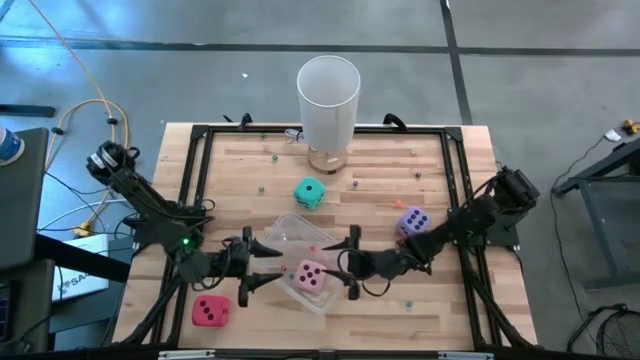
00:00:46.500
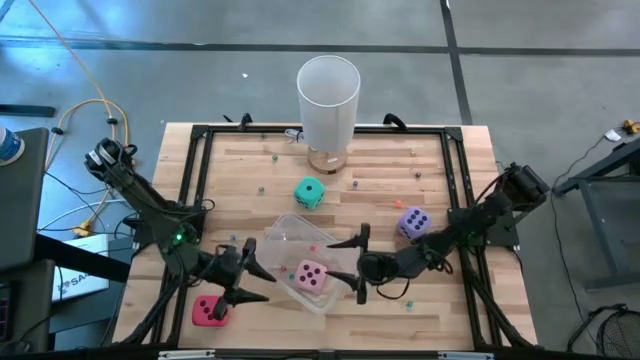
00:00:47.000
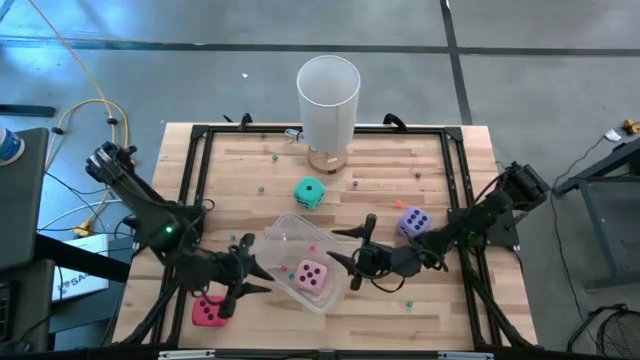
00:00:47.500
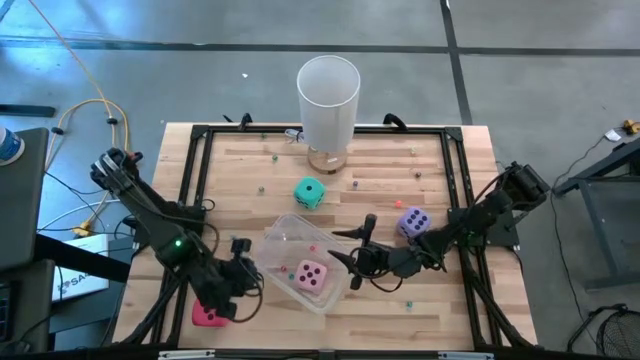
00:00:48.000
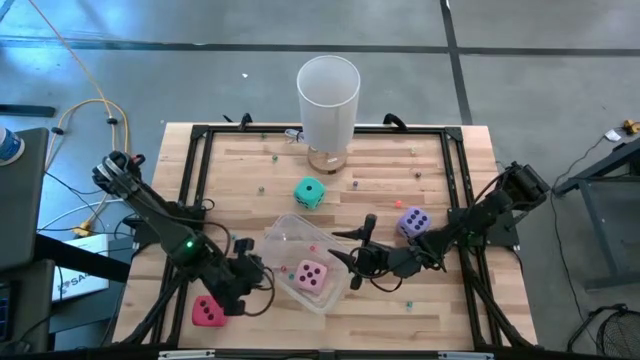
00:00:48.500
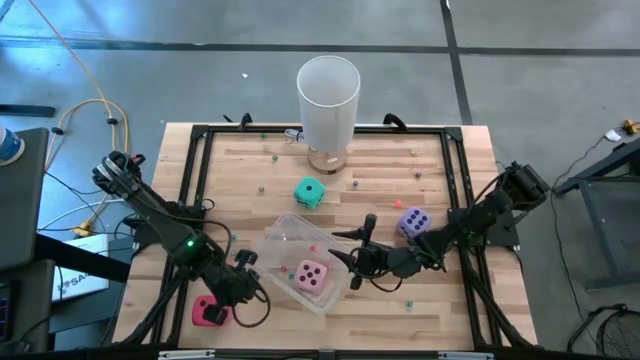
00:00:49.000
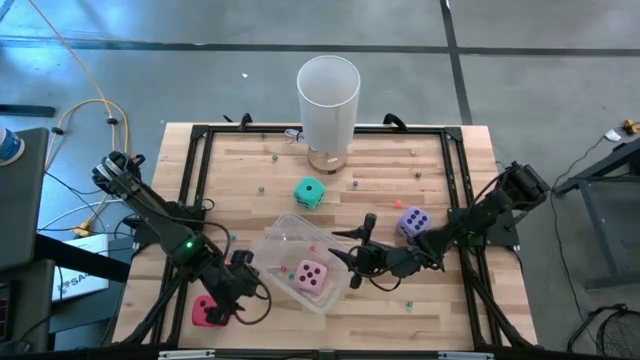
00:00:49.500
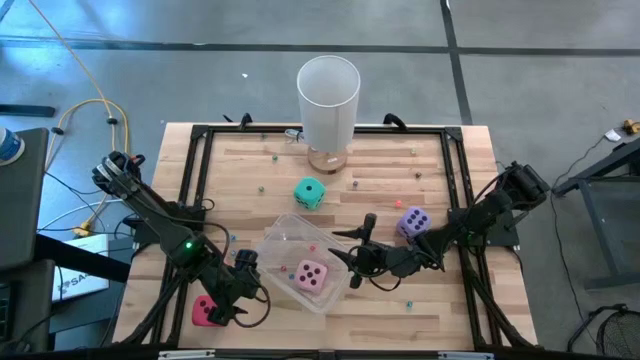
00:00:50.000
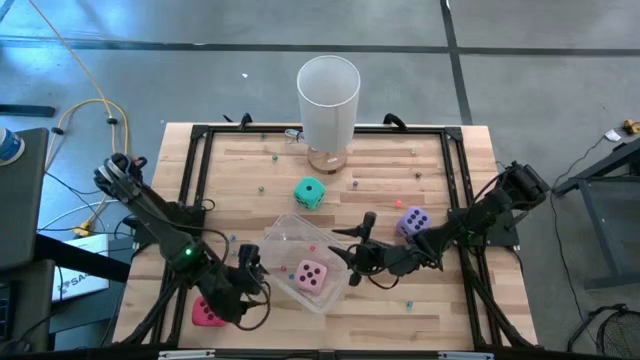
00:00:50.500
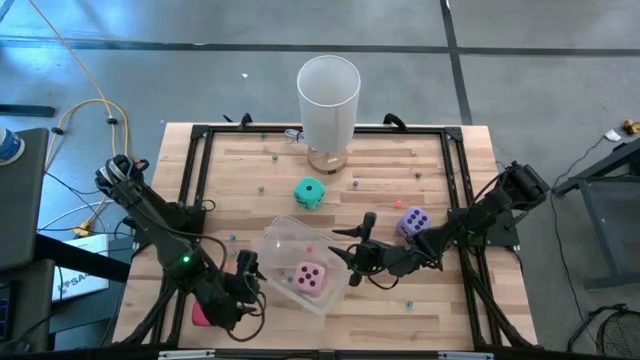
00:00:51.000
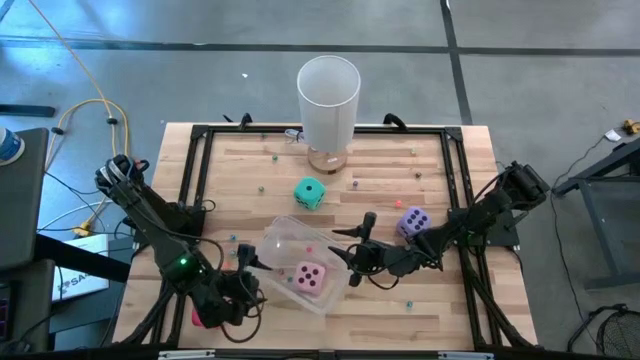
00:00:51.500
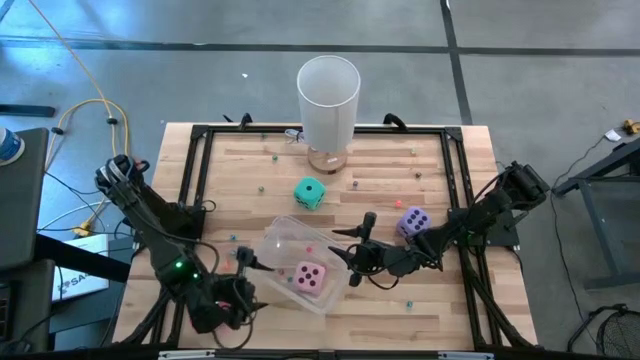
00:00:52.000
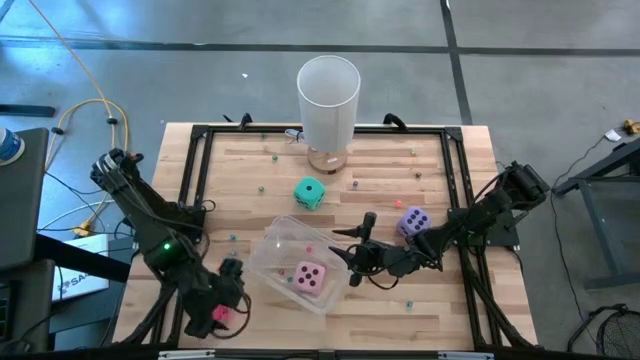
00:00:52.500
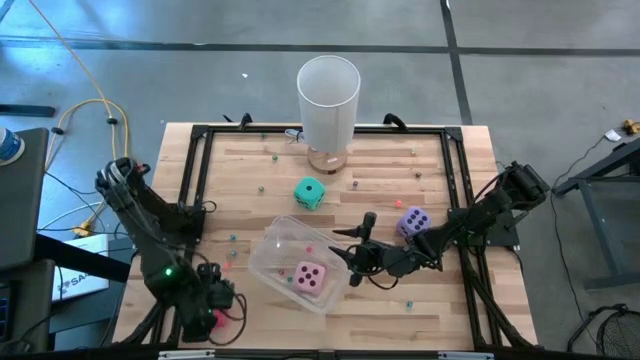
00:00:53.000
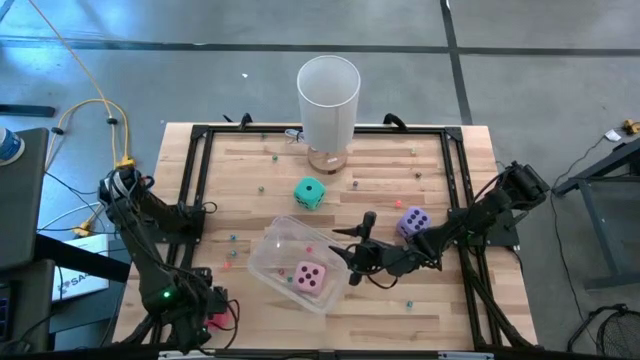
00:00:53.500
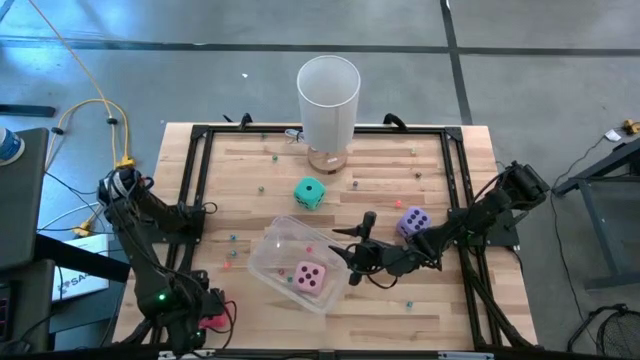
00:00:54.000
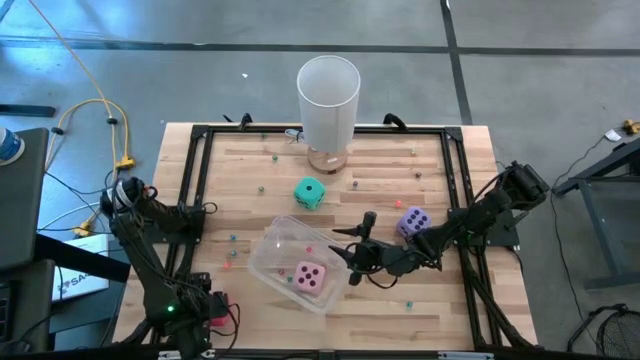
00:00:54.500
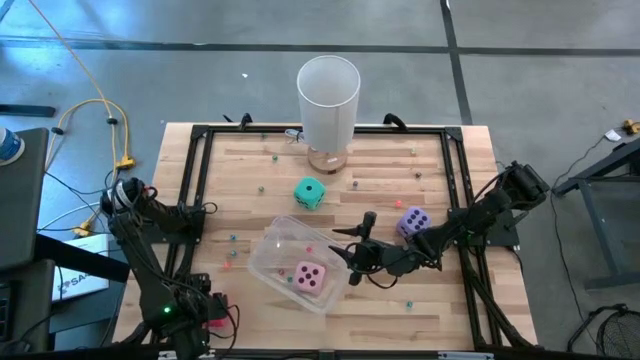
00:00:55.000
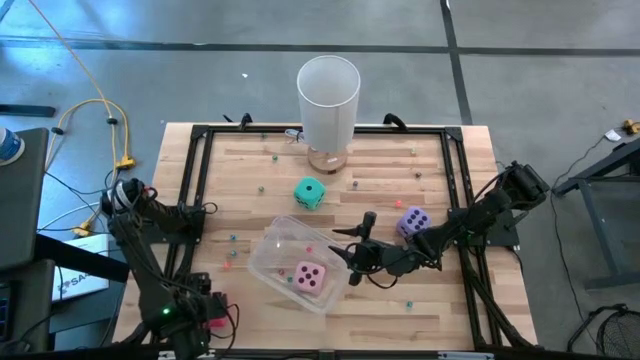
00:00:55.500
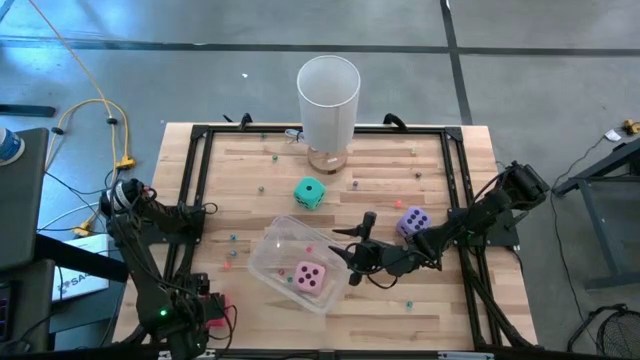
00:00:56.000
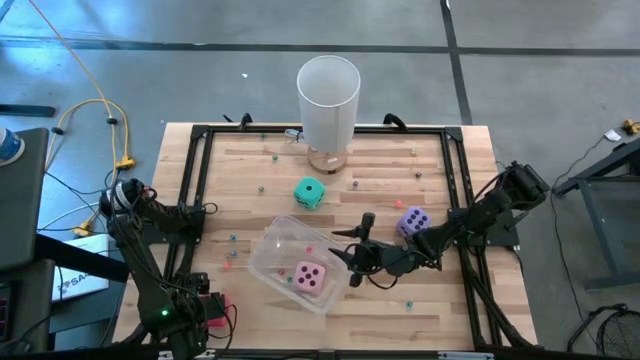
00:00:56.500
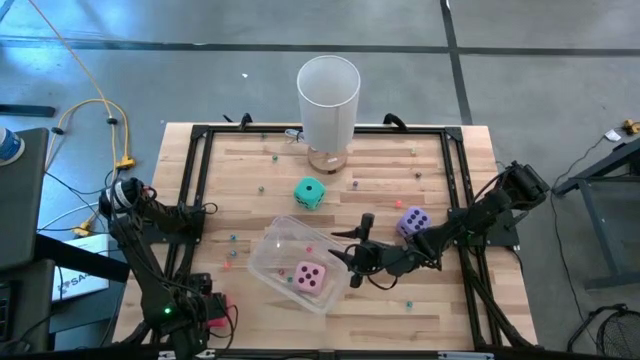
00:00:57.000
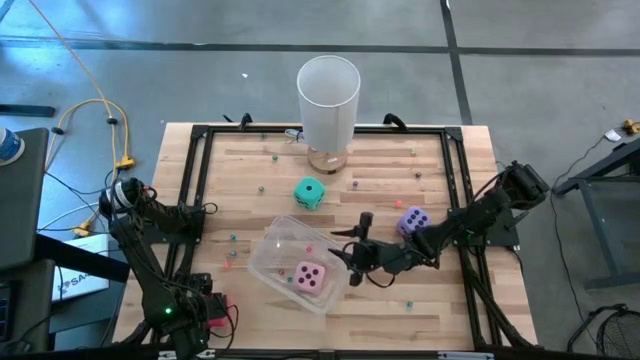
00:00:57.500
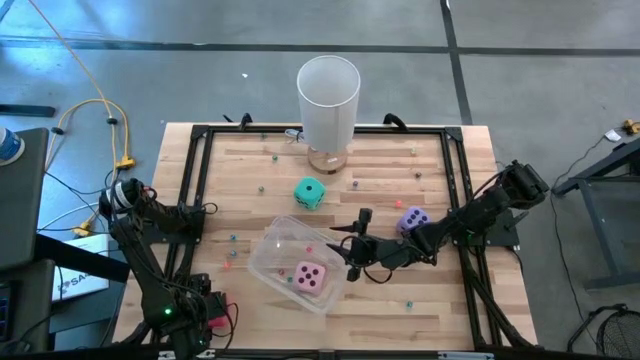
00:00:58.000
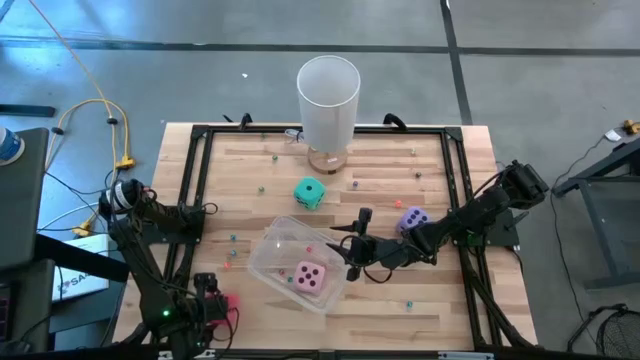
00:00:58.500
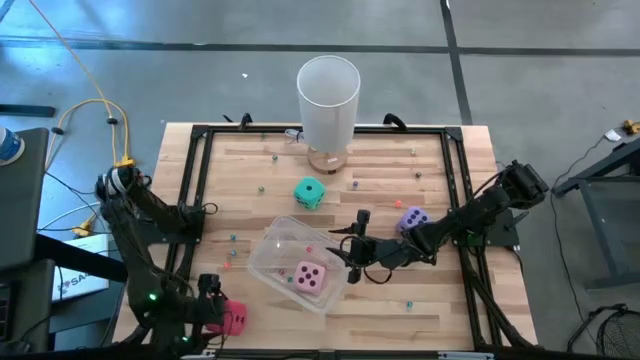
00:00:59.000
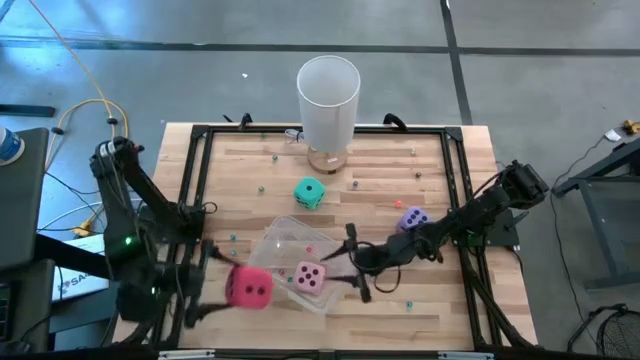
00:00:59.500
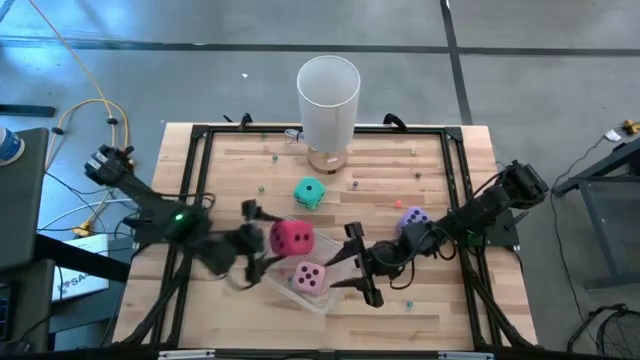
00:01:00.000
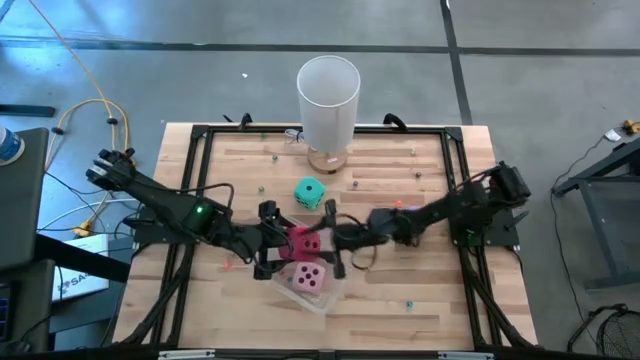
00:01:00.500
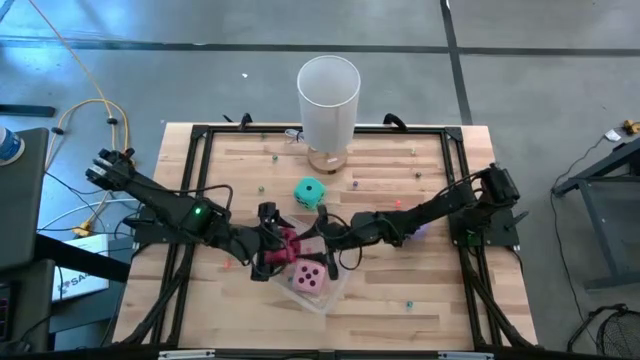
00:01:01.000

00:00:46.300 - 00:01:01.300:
Task: Pick & Place Dice
Put the big orange dice into the transparent bin
